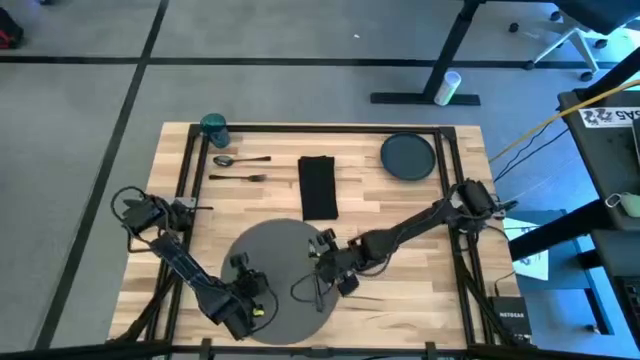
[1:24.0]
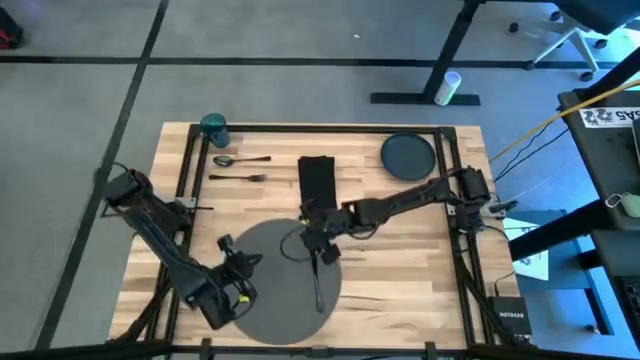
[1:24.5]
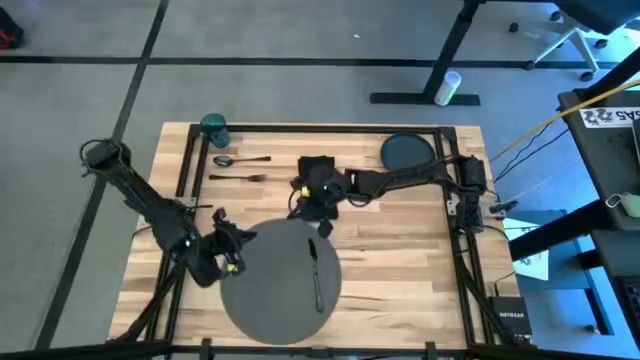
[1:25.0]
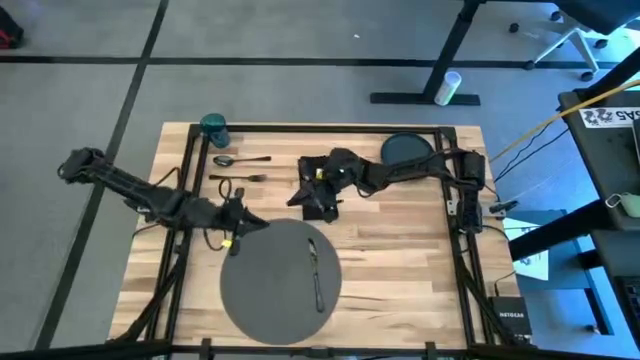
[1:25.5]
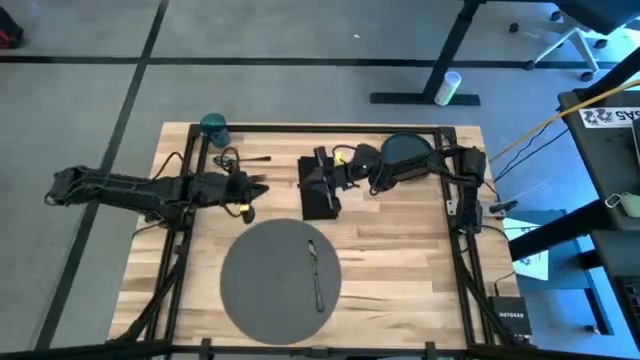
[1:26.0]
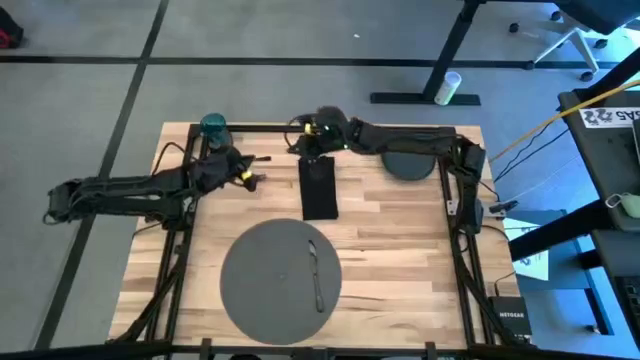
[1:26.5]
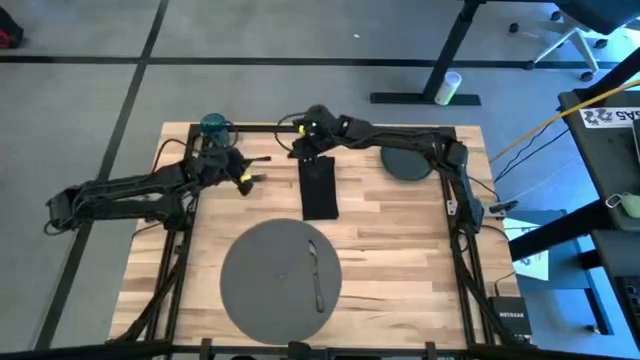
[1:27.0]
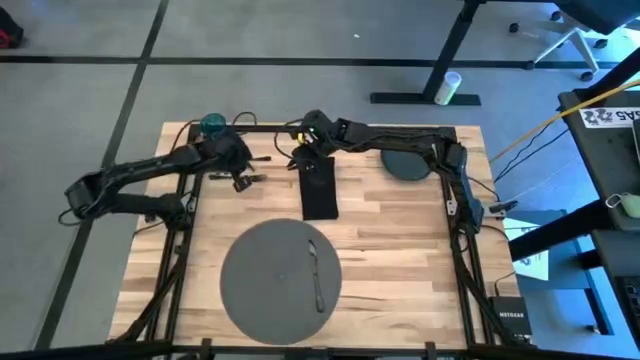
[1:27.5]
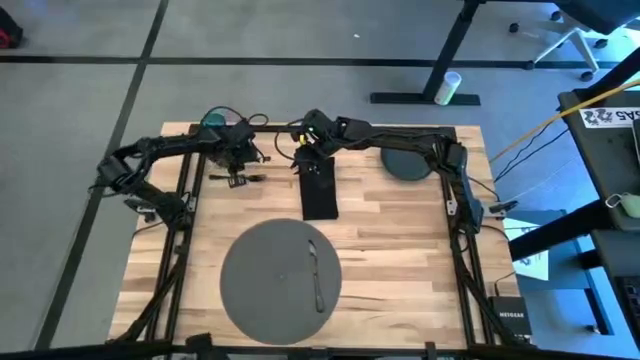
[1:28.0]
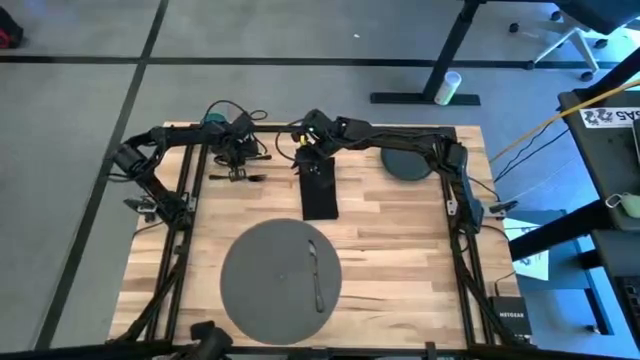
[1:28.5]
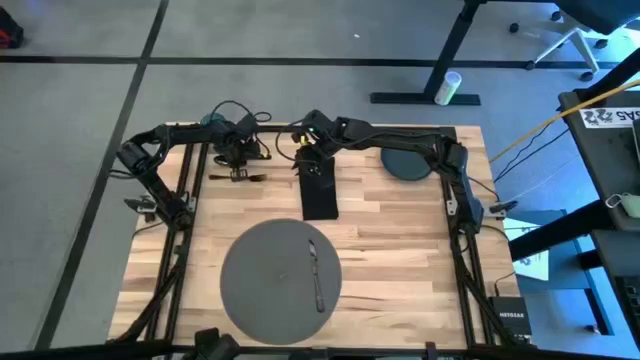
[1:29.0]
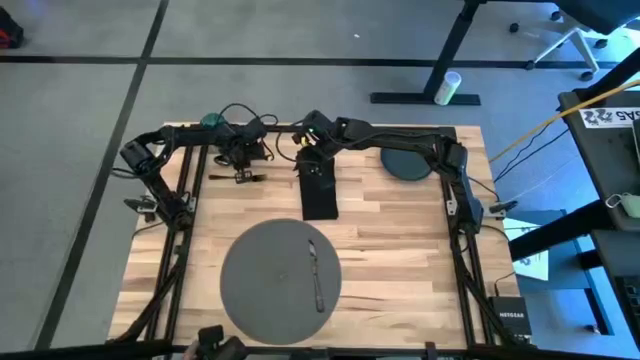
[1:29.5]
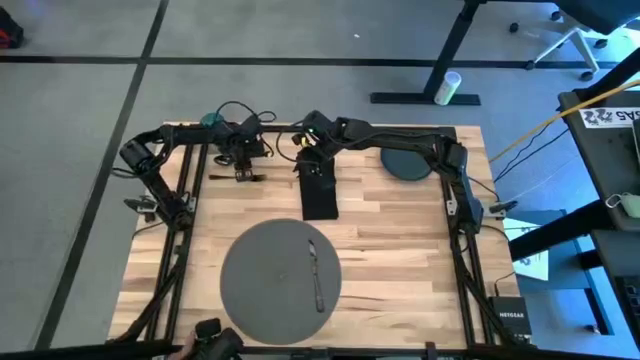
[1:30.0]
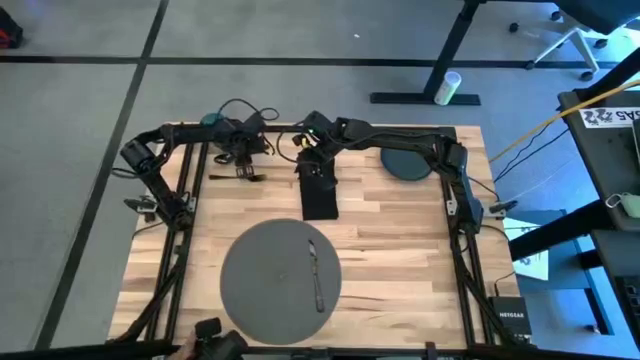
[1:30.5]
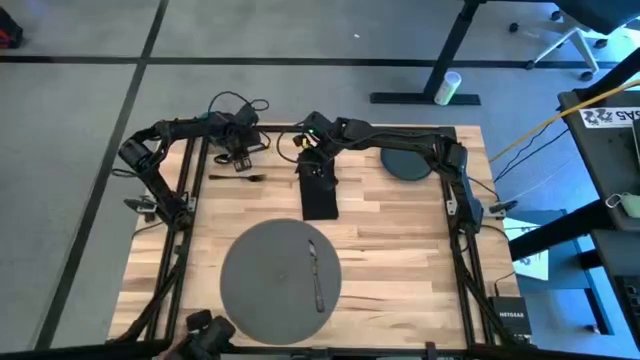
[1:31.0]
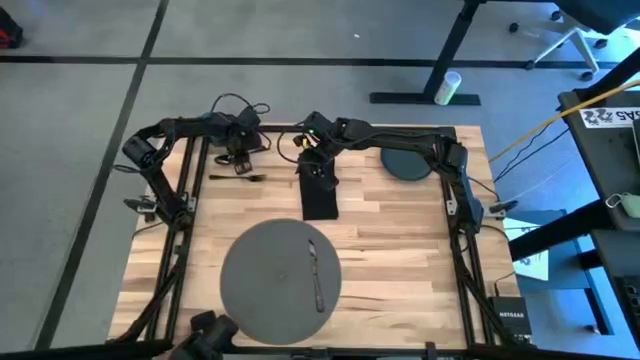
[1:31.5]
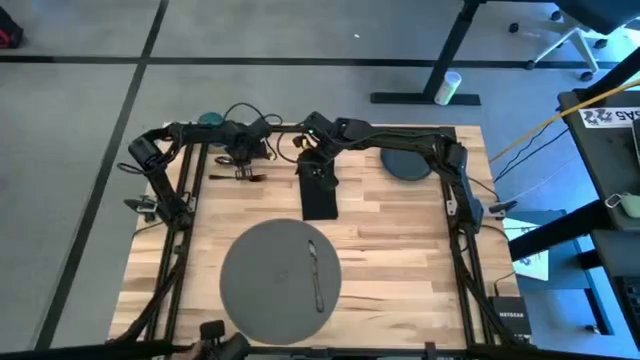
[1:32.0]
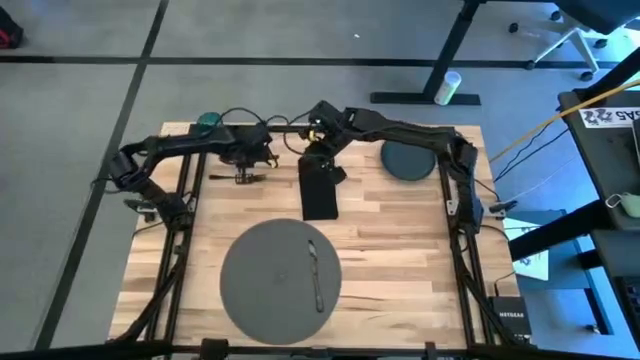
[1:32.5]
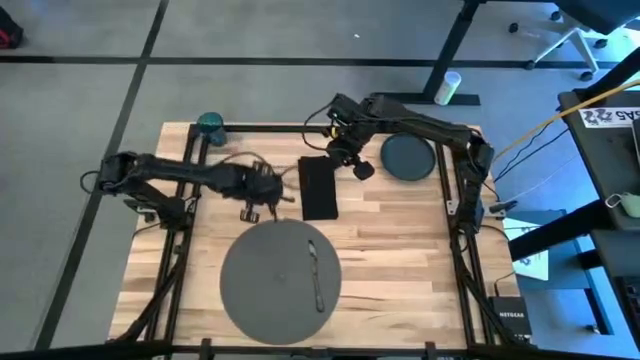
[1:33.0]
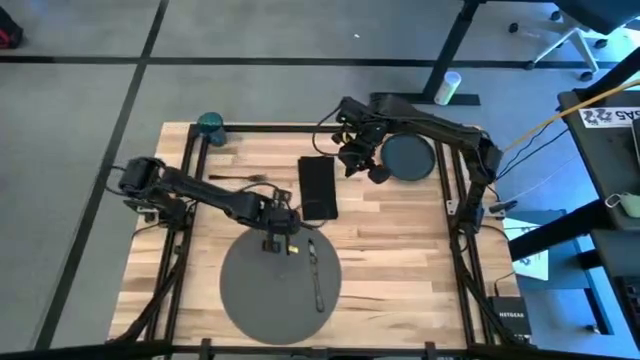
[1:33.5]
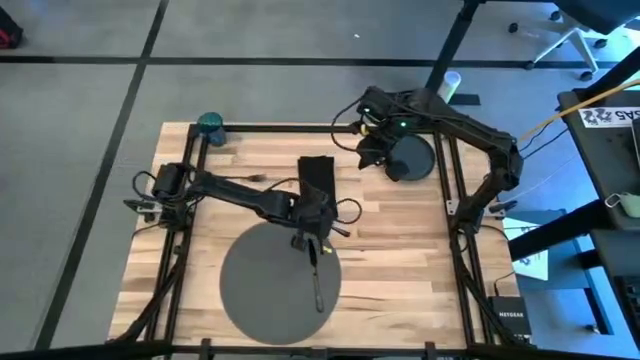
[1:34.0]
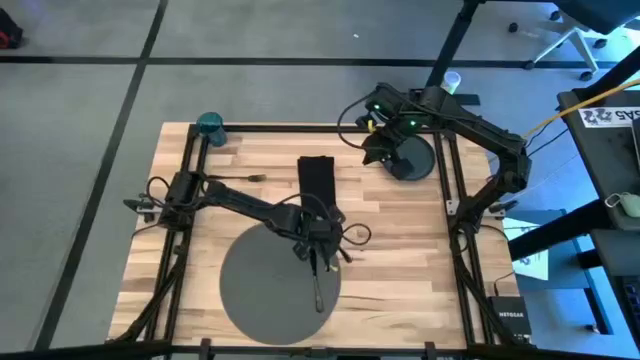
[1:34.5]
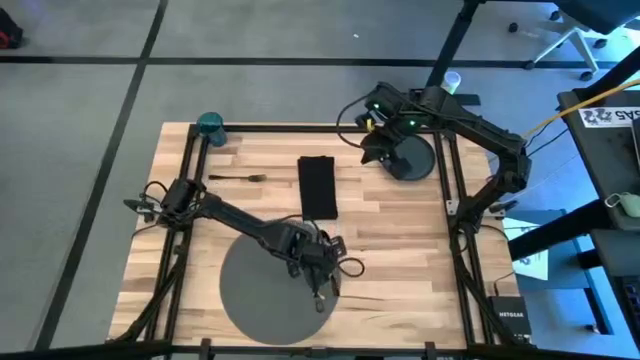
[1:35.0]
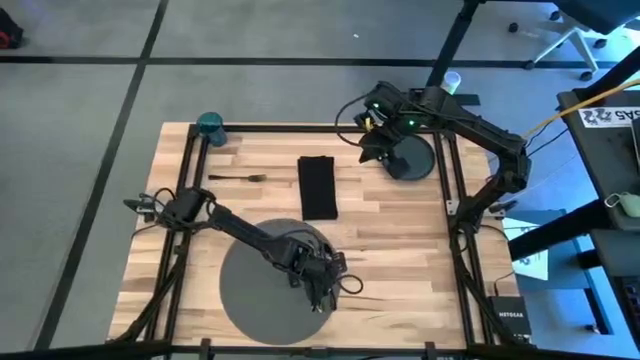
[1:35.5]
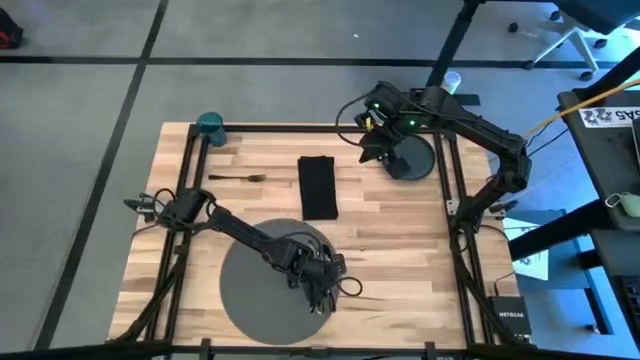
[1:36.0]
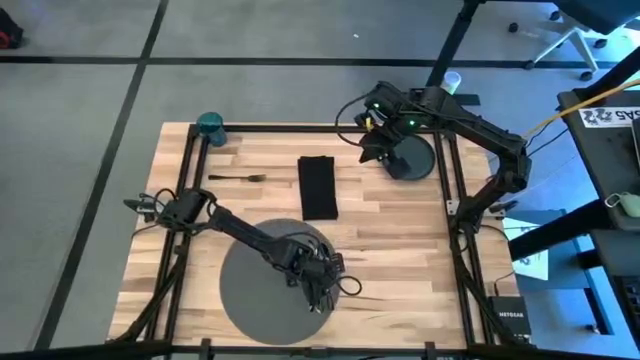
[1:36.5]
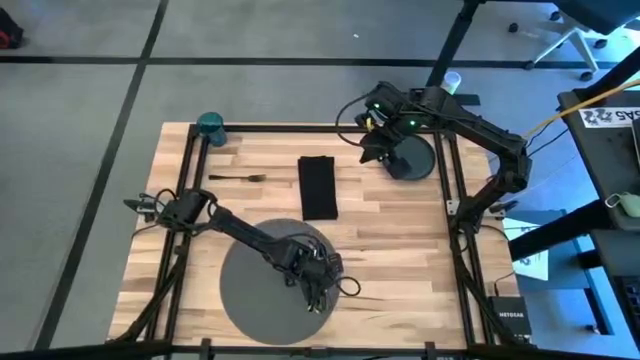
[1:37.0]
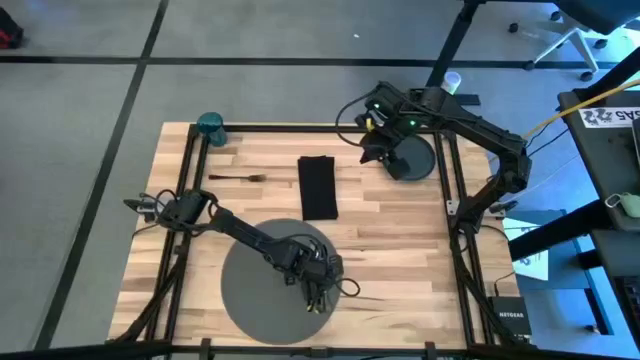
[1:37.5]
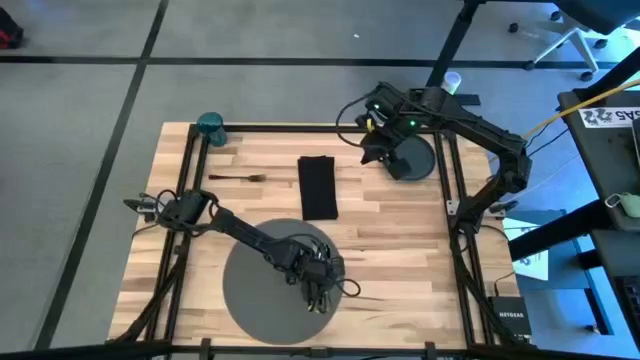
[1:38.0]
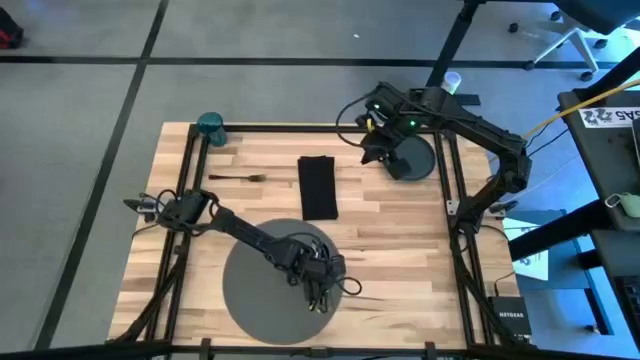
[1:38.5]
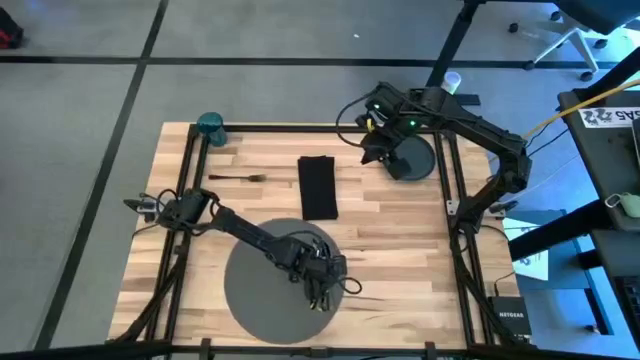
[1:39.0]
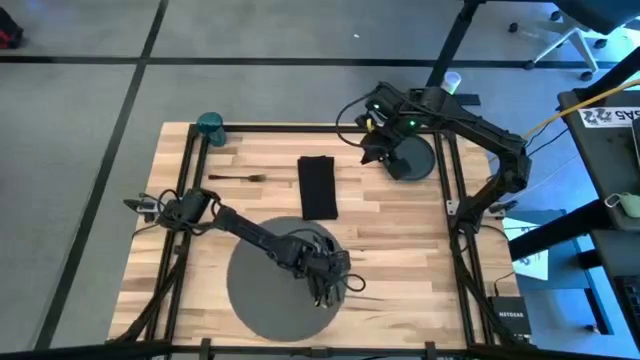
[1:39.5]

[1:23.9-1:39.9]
Task: Set table place
Put the black spoon on the black table mat to the right of the black table knife

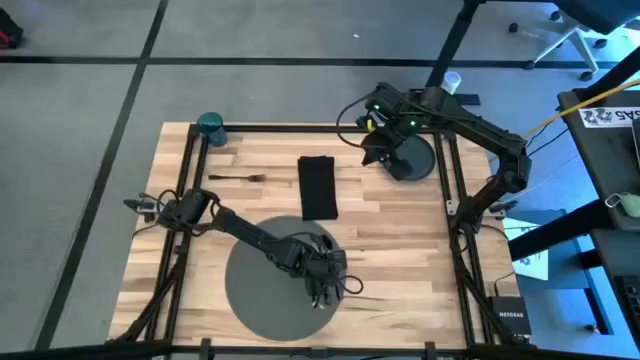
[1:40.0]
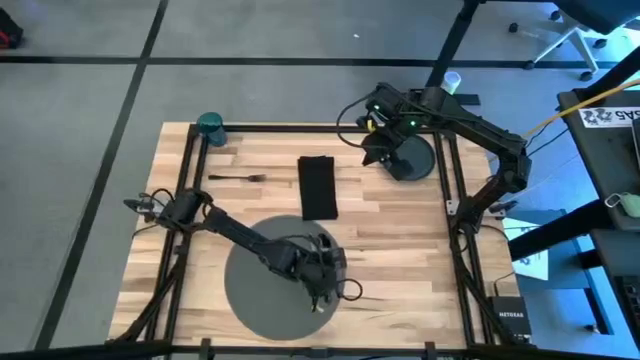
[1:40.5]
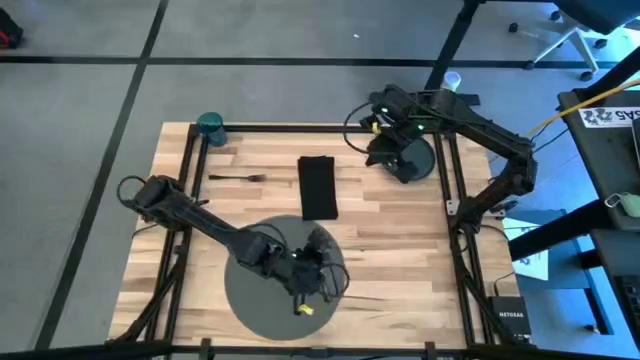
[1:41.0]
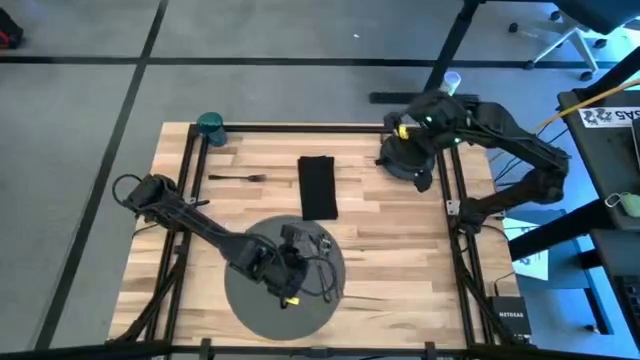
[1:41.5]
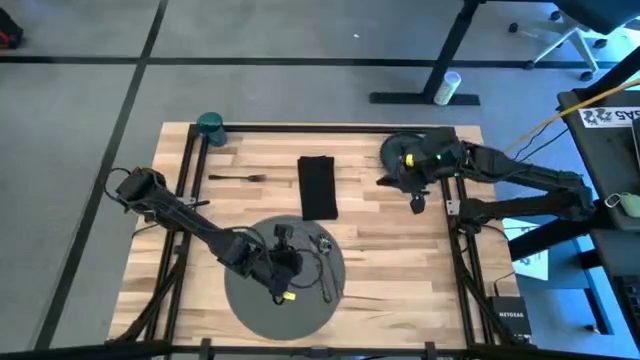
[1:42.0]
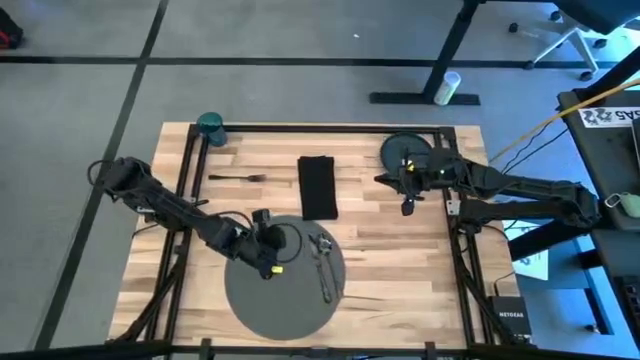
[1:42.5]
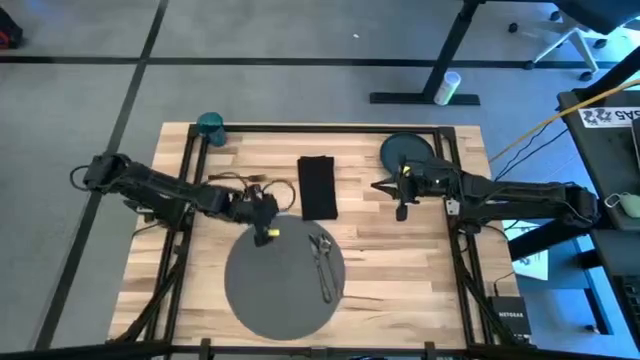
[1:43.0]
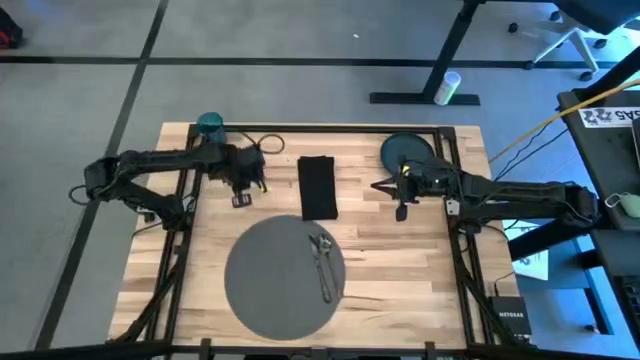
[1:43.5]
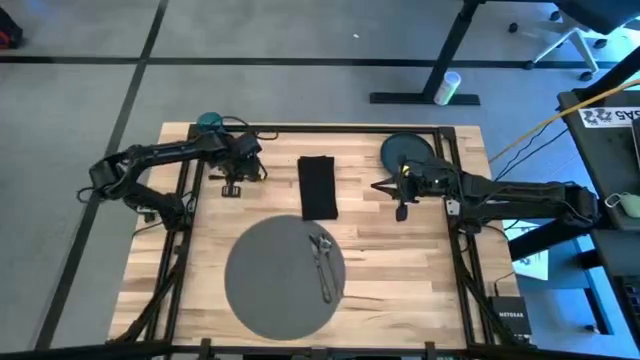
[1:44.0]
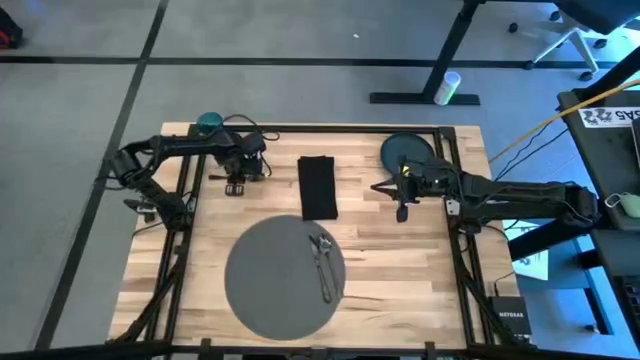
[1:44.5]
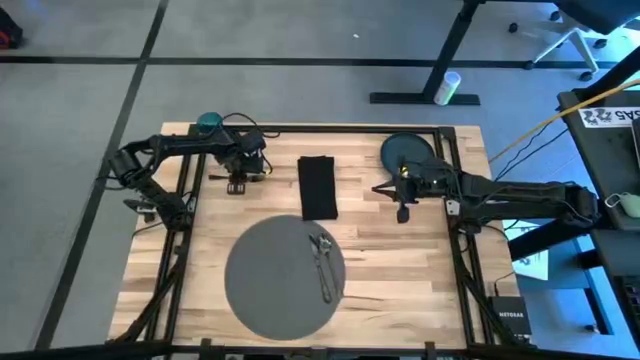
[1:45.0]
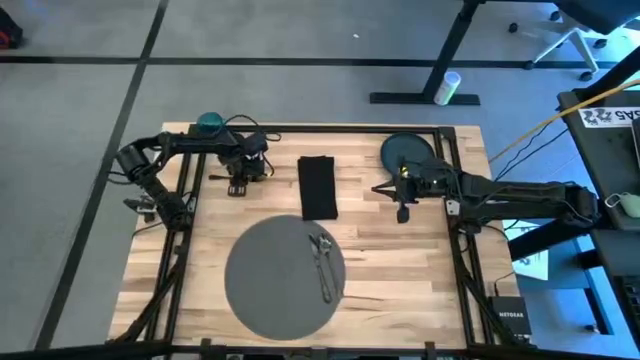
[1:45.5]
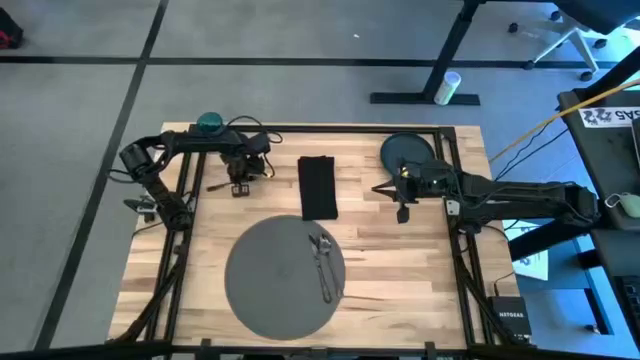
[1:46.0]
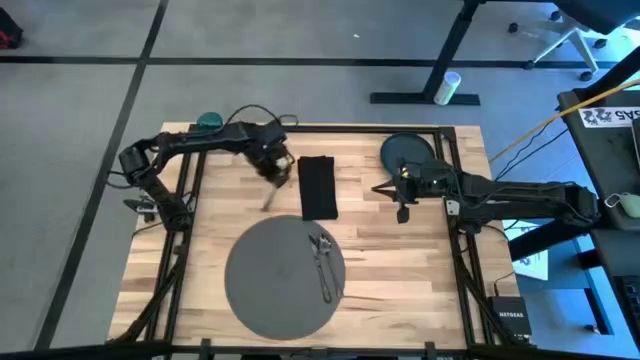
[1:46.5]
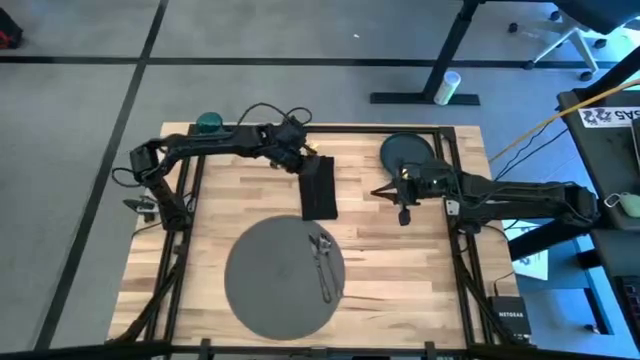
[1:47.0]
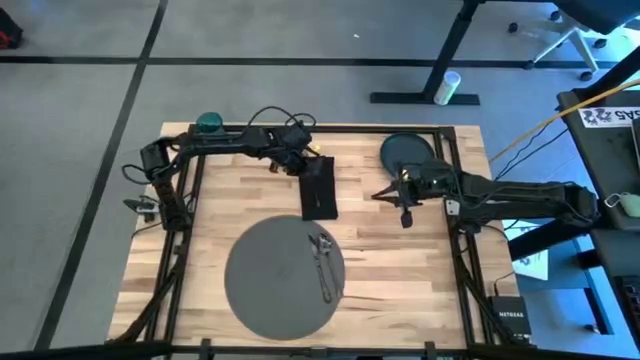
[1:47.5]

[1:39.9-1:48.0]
Put the black fork on the black table napkin
